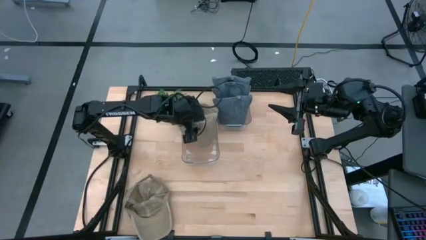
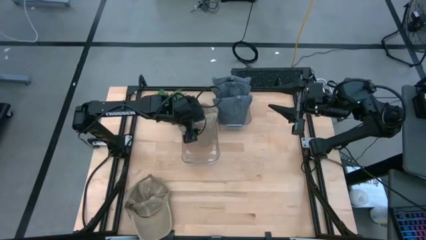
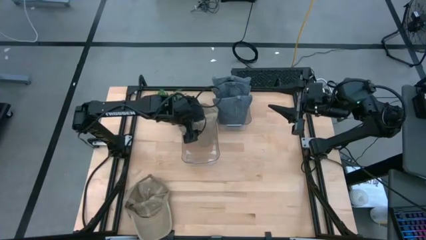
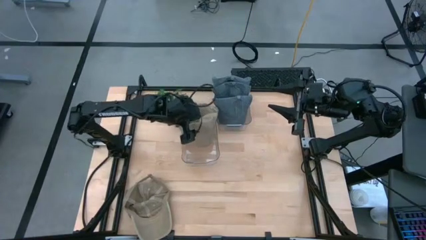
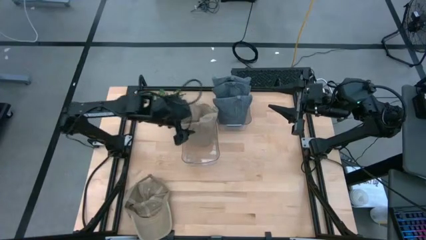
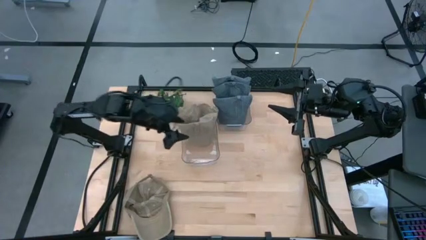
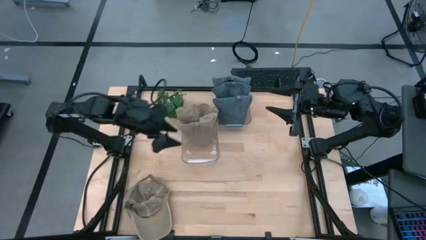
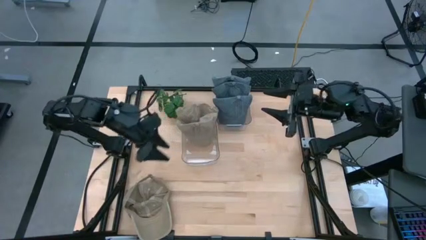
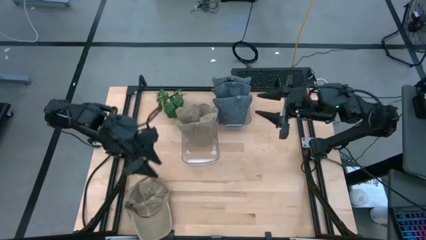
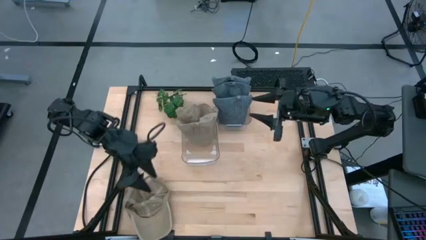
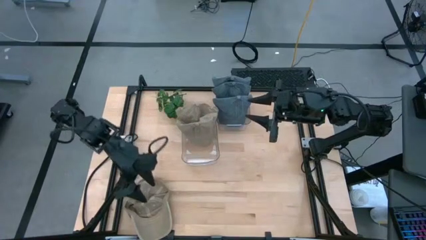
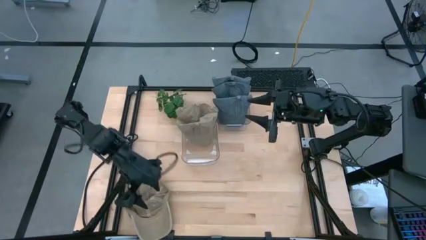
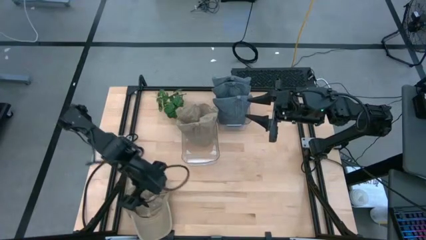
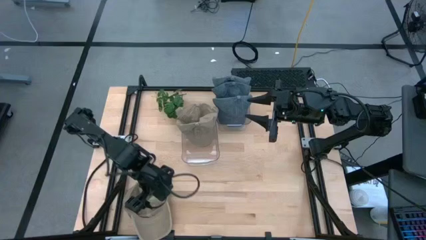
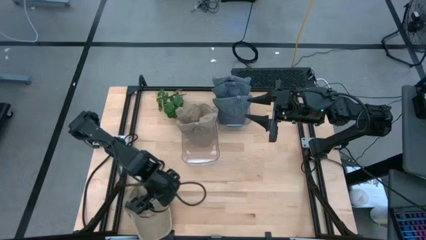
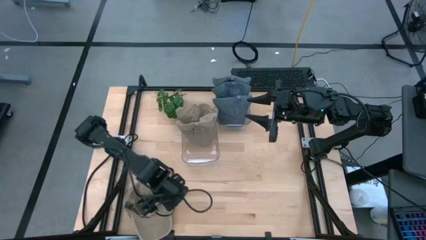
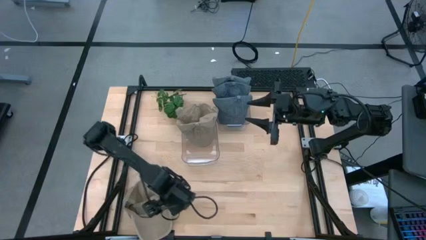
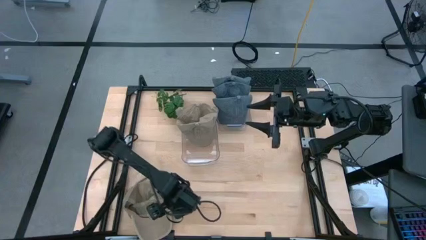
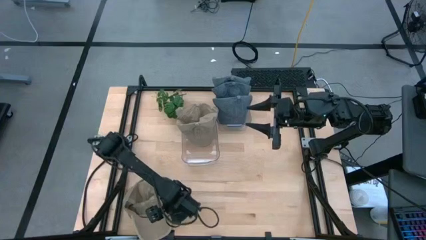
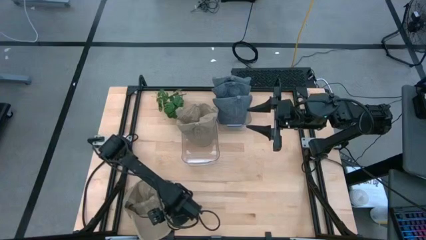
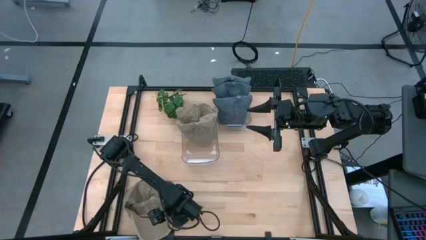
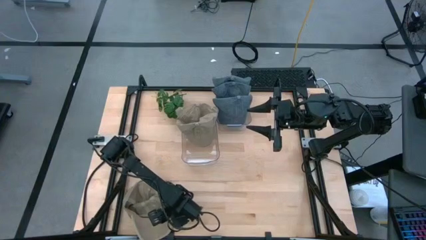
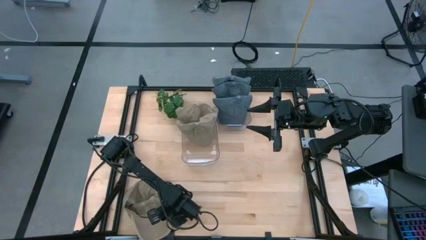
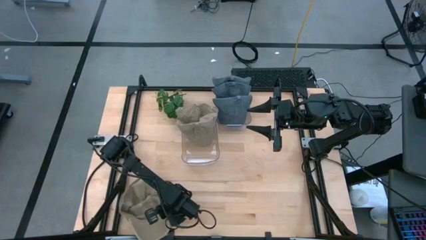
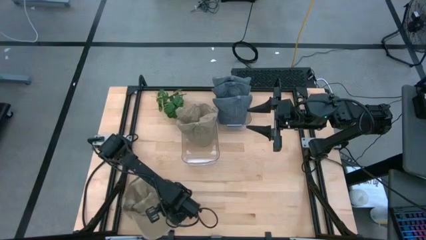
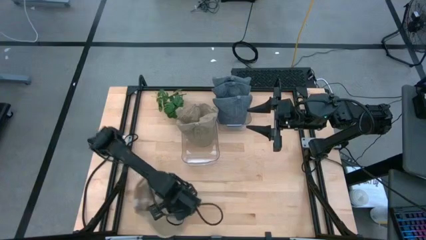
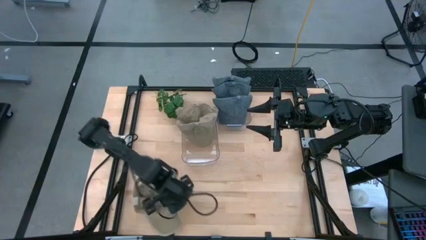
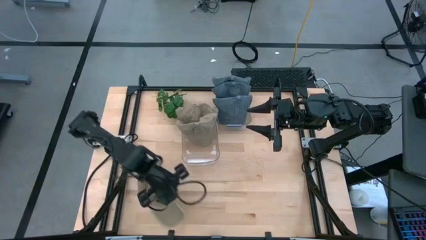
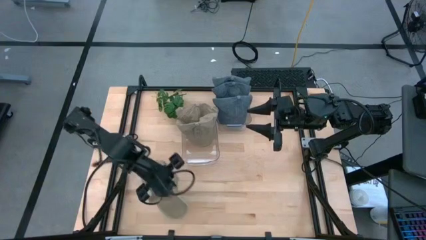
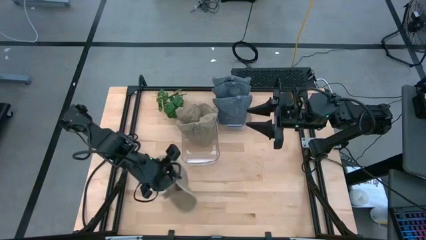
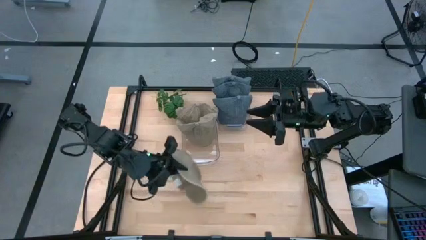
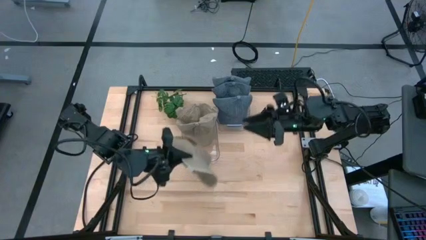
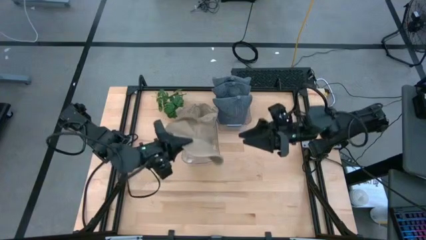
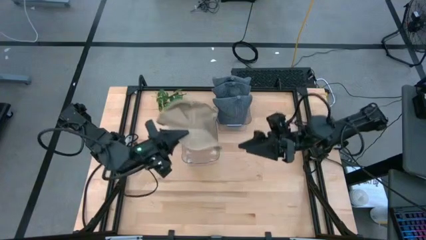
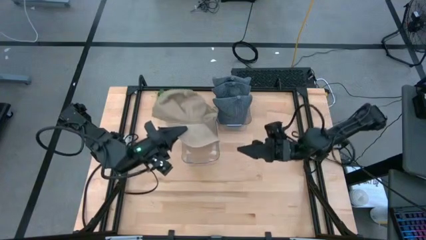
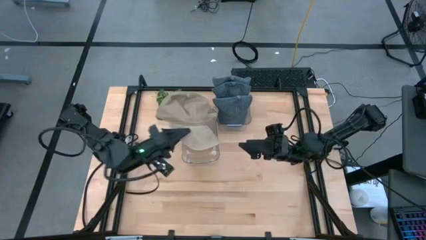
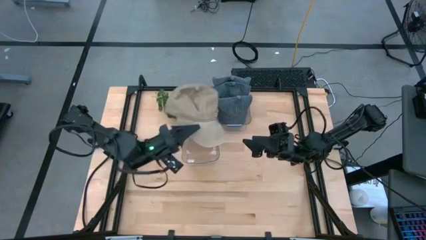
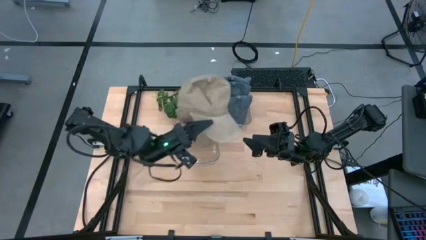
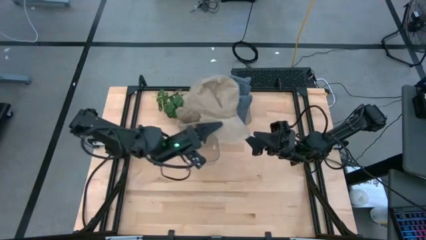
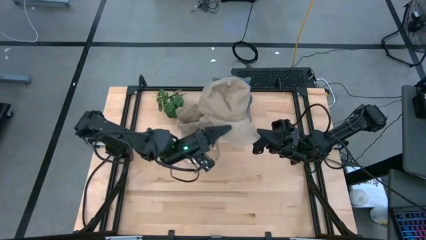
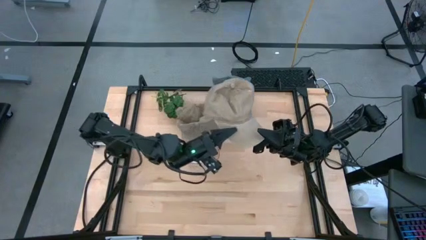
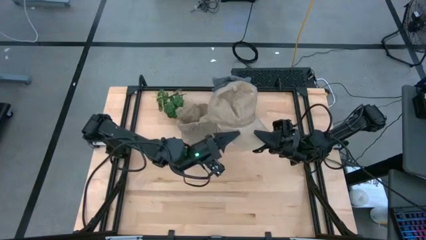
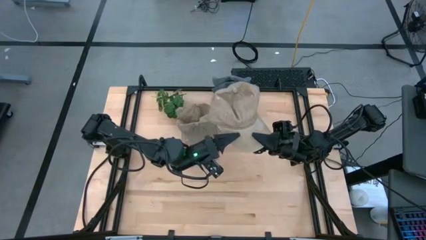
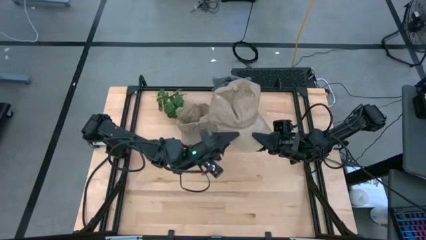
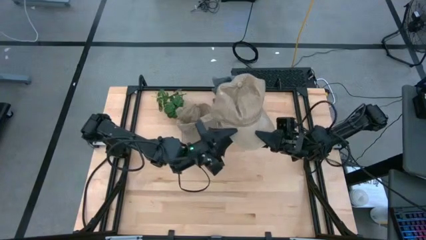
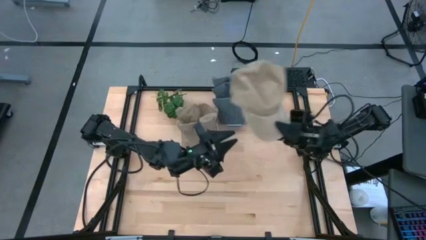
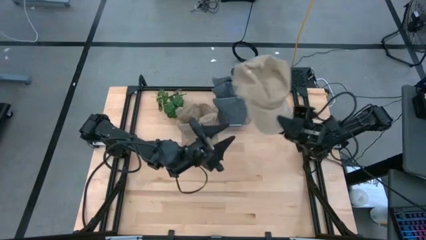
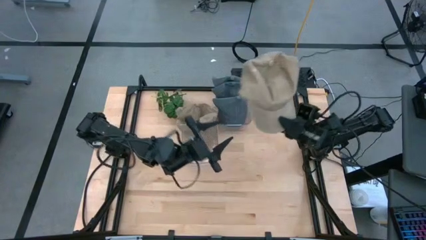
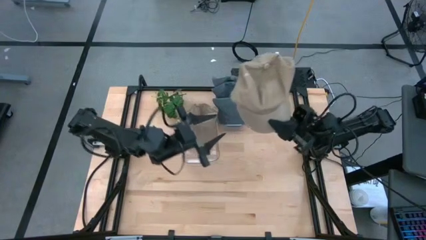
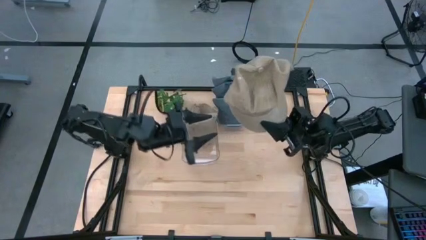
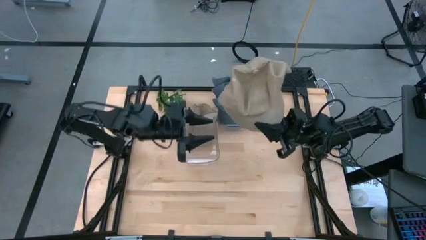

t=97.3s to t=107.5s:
Task: Pick & Place hat
Put the brown cap into the left transparent bin

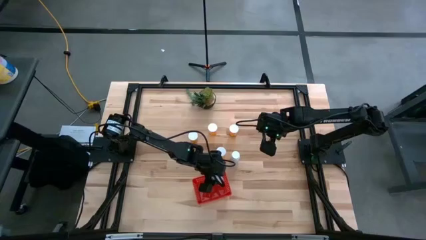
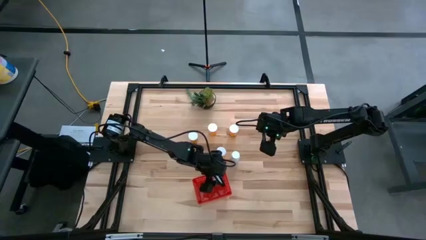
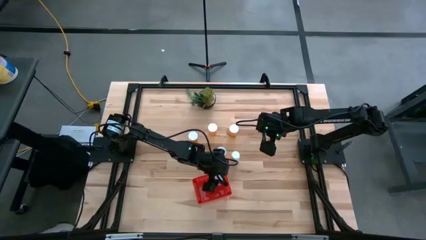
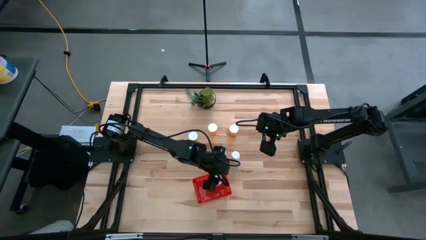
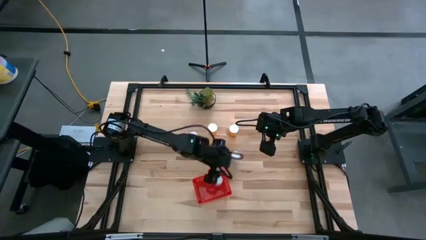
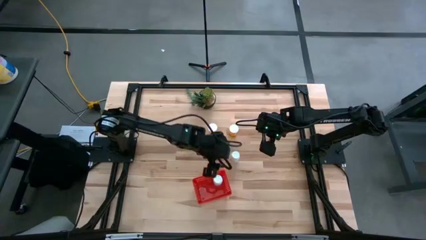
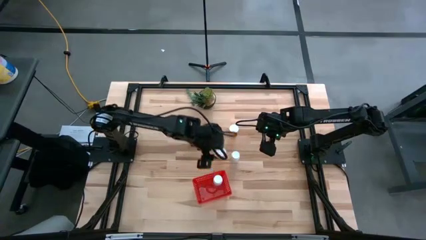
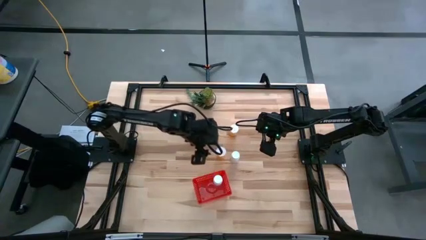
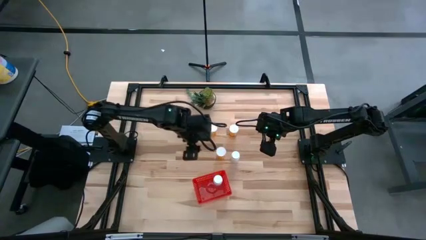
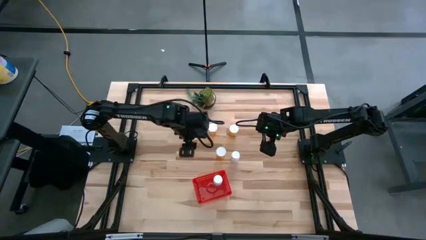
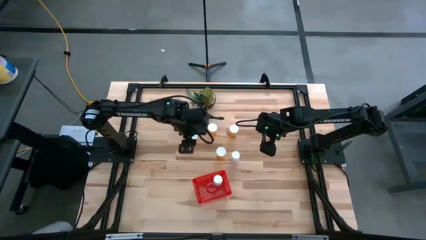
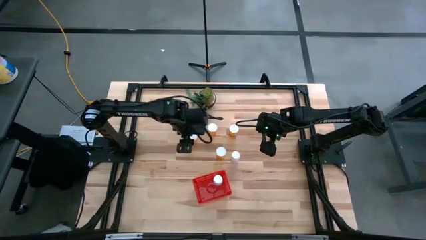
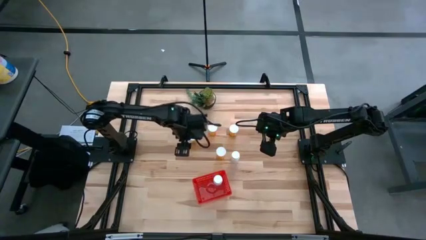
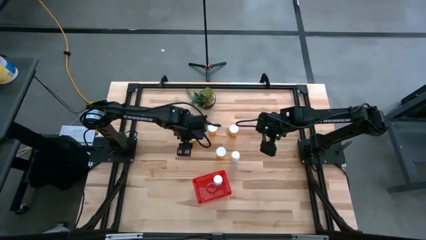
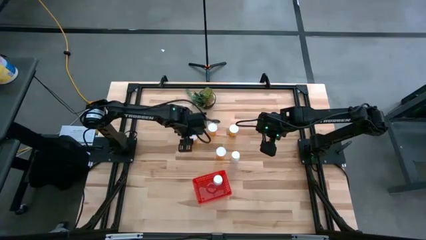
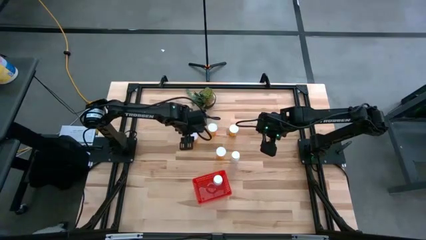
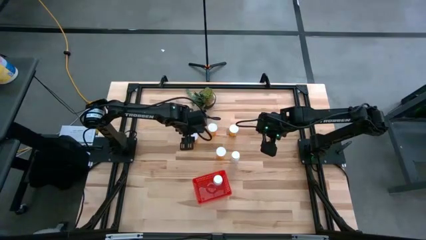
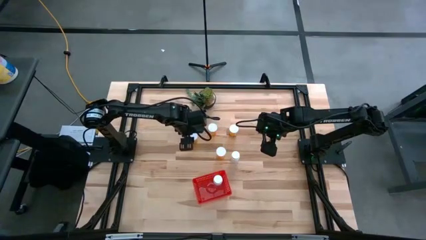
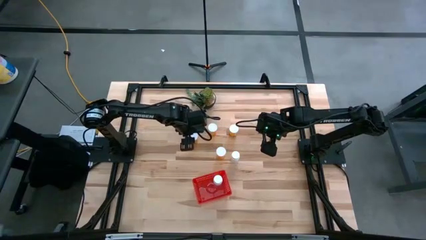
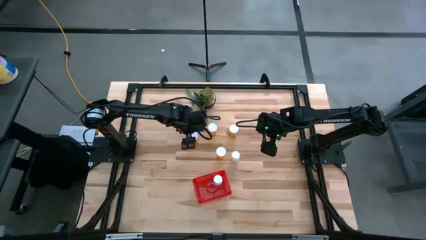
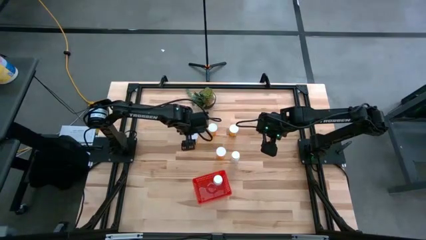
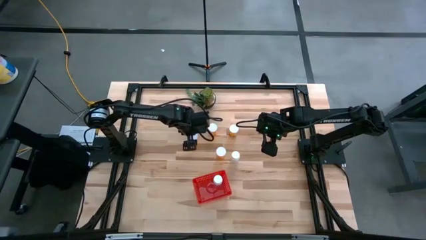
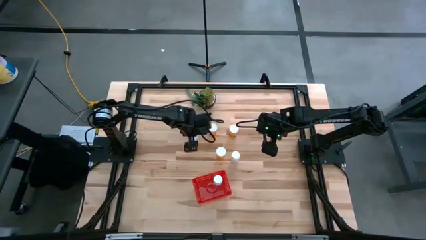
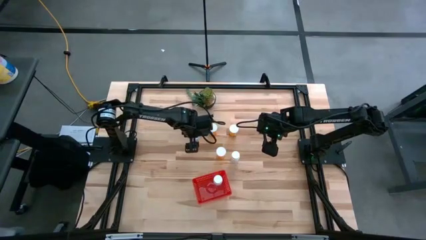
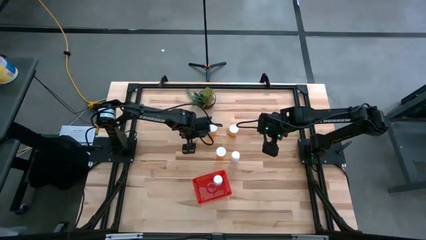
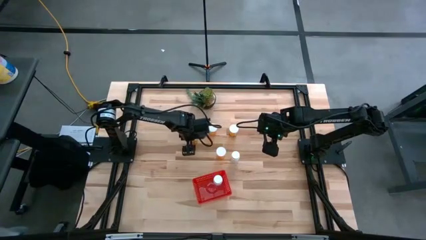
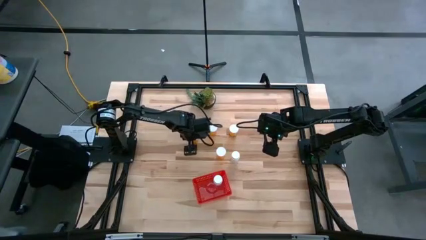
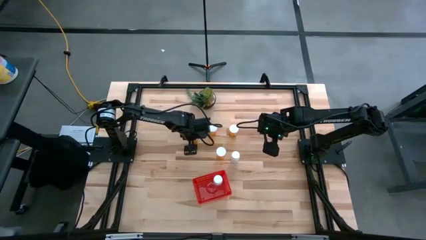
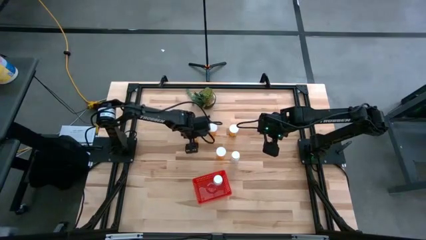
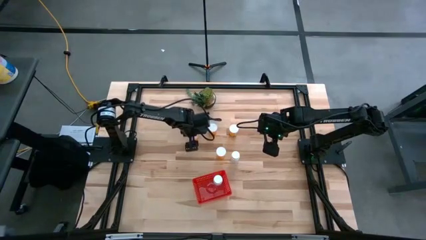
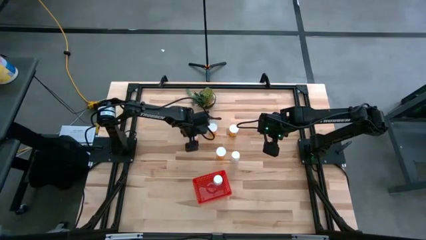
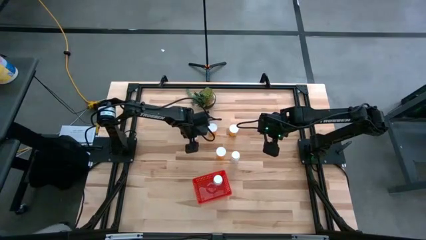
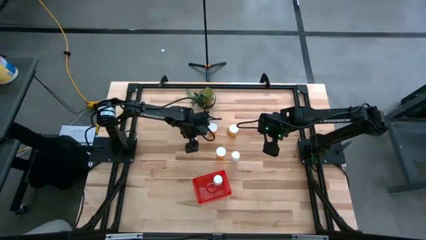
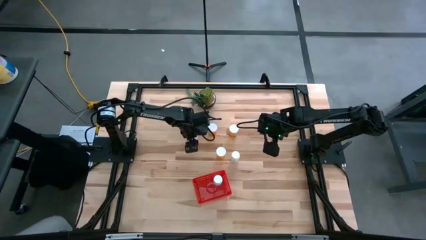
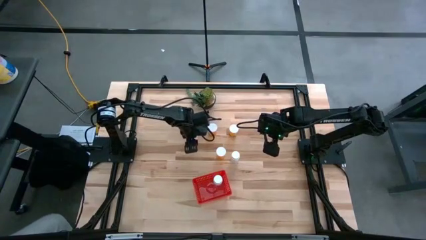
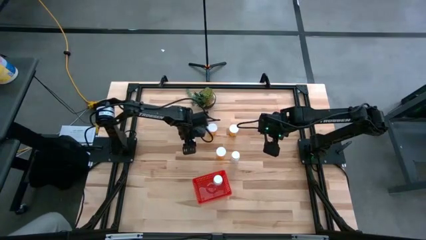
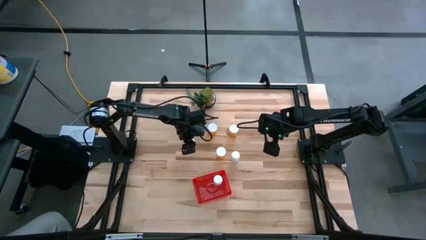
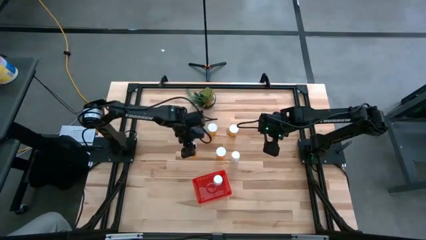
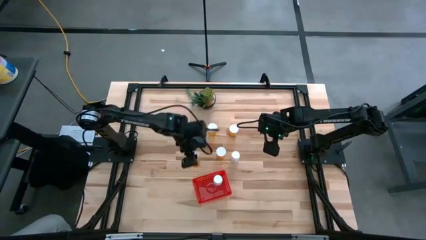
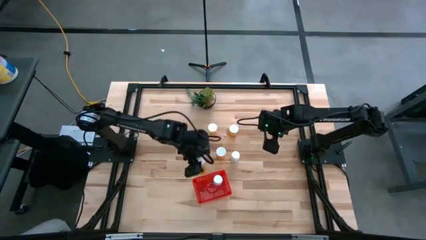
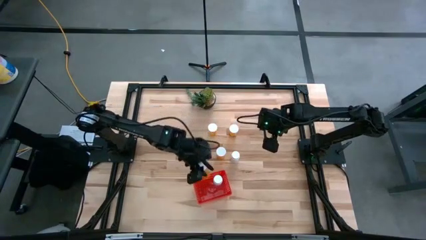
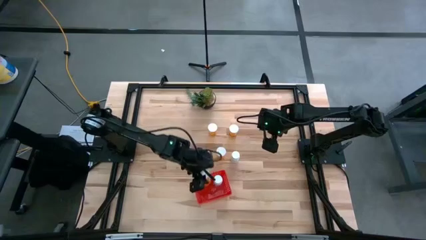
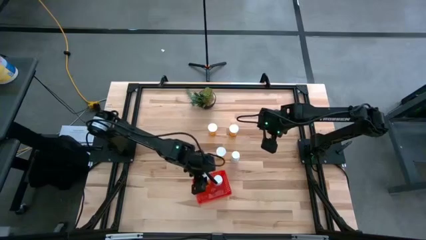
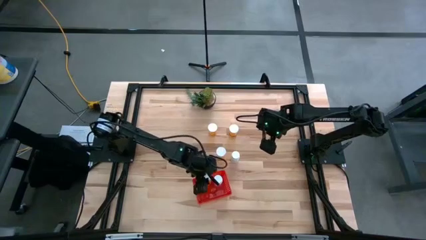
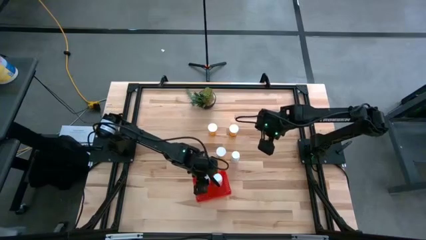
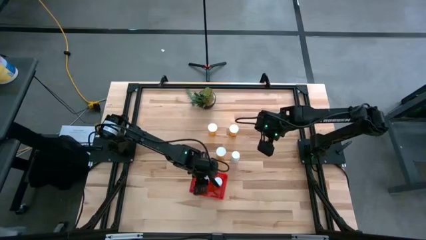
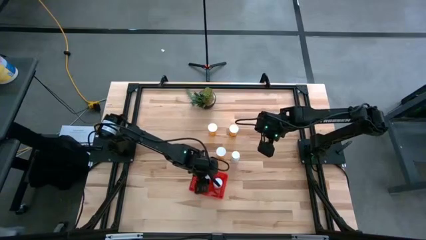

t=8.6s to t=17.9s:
Task: Pick and place pill bottles into a basket
Put the top left orange pill bottle into the basket
